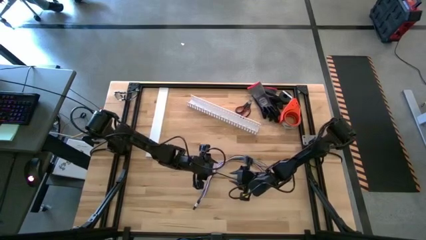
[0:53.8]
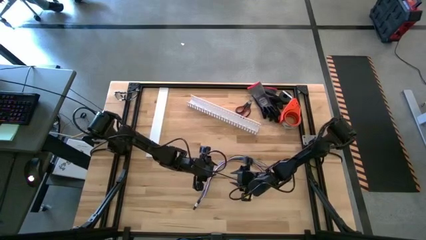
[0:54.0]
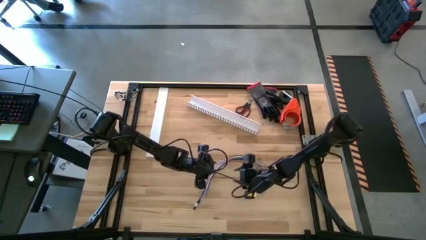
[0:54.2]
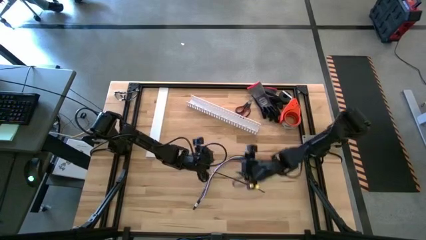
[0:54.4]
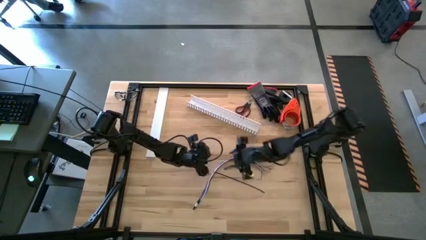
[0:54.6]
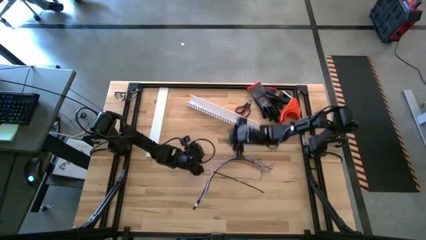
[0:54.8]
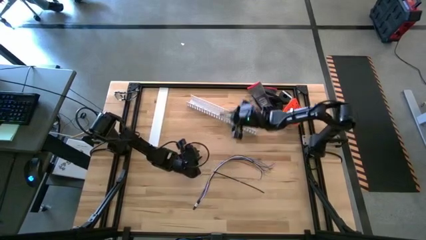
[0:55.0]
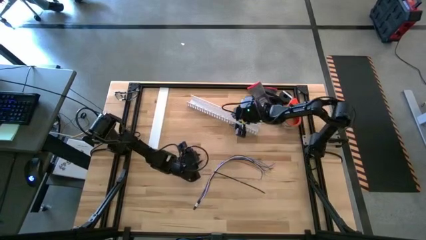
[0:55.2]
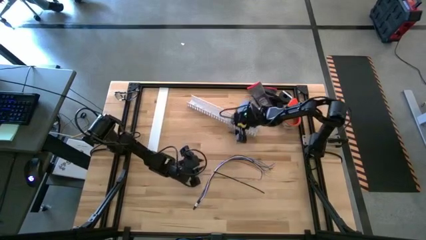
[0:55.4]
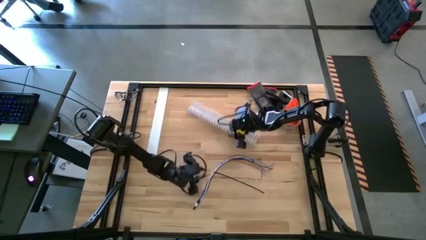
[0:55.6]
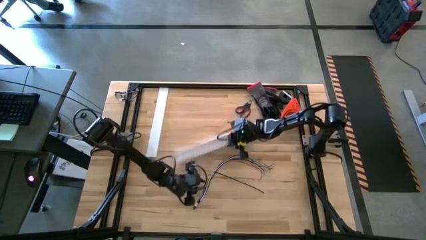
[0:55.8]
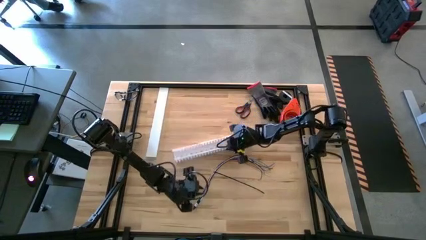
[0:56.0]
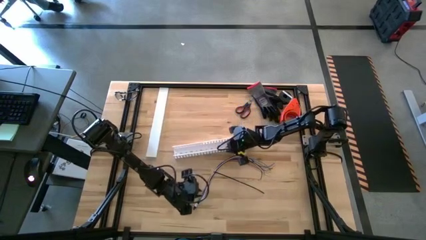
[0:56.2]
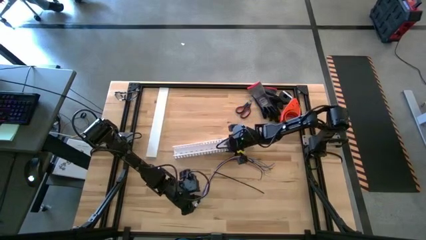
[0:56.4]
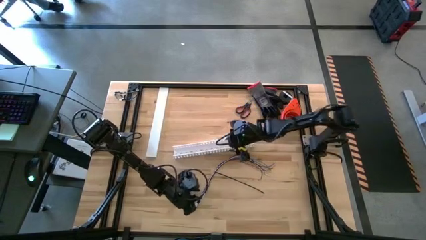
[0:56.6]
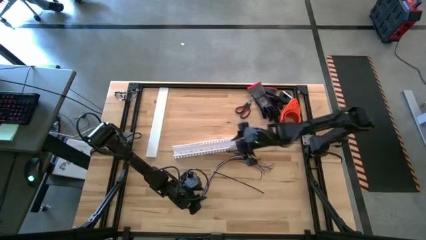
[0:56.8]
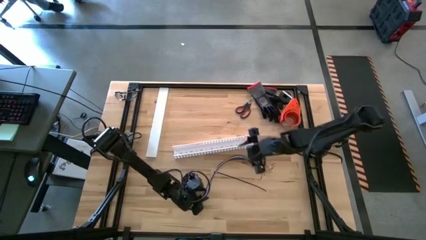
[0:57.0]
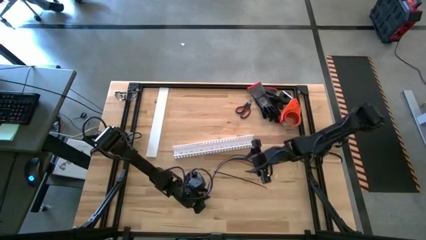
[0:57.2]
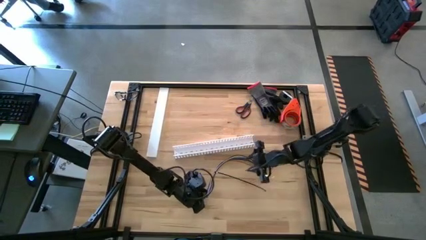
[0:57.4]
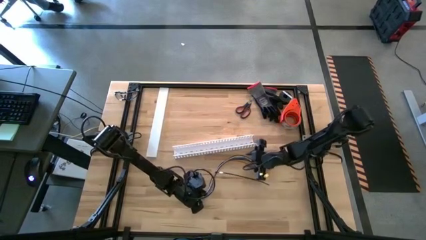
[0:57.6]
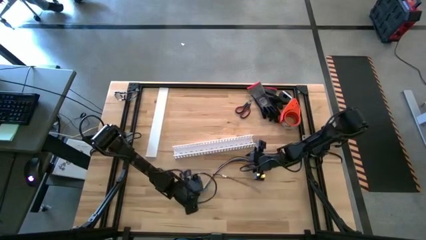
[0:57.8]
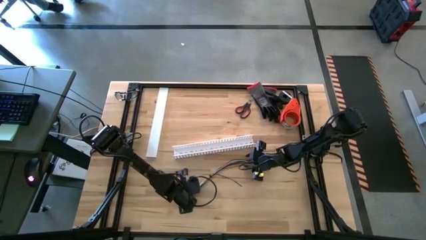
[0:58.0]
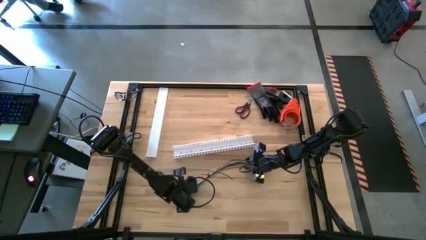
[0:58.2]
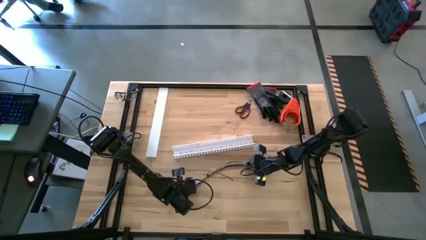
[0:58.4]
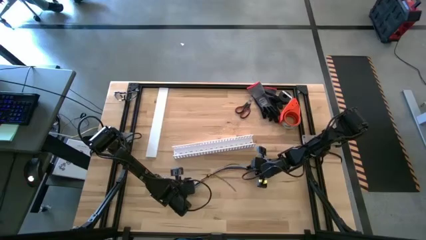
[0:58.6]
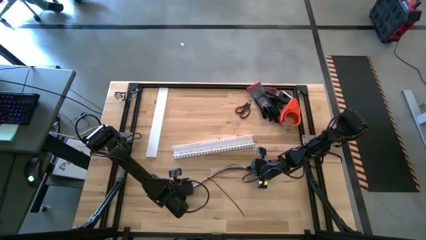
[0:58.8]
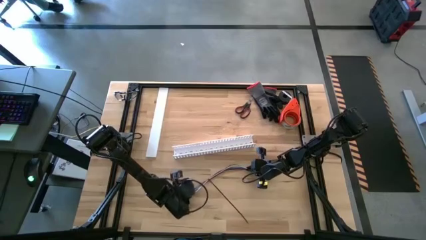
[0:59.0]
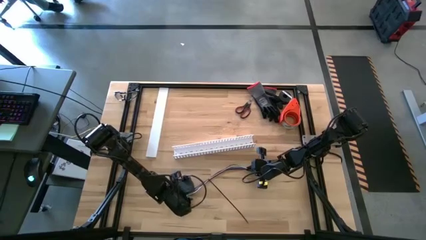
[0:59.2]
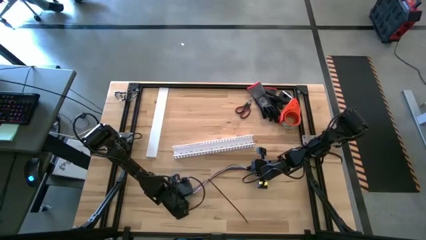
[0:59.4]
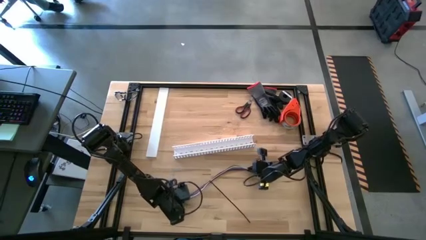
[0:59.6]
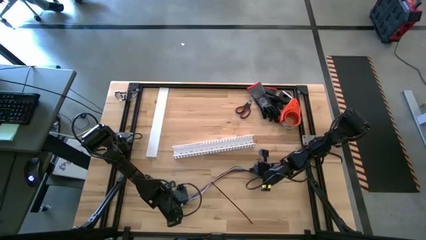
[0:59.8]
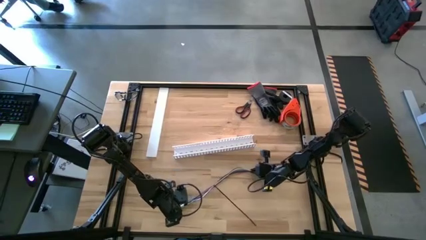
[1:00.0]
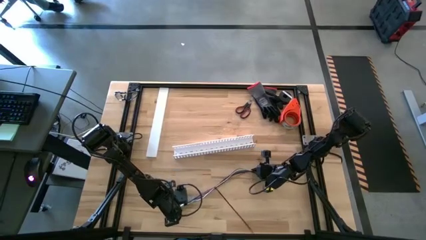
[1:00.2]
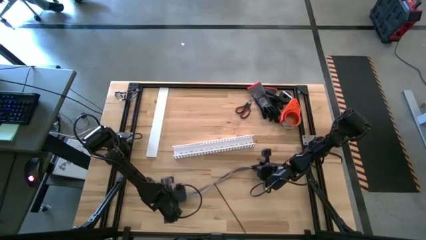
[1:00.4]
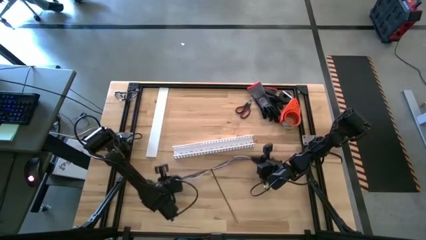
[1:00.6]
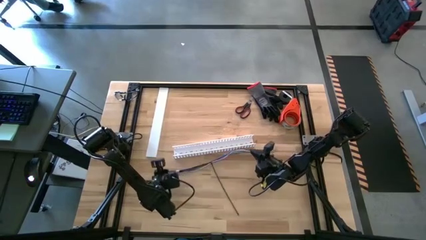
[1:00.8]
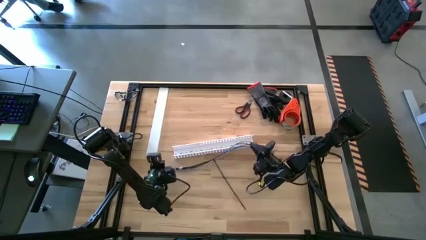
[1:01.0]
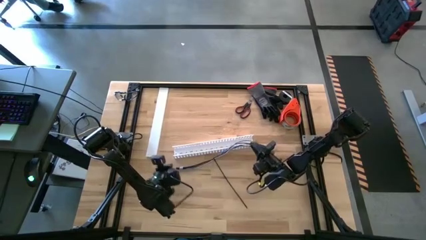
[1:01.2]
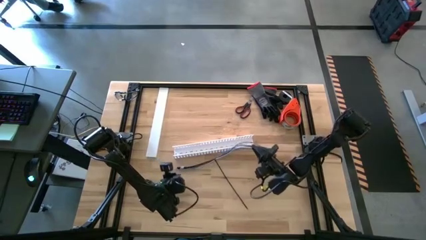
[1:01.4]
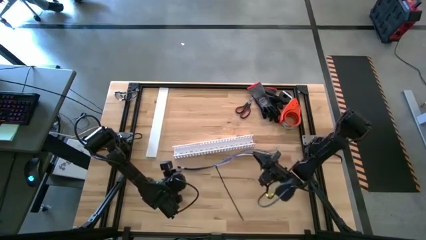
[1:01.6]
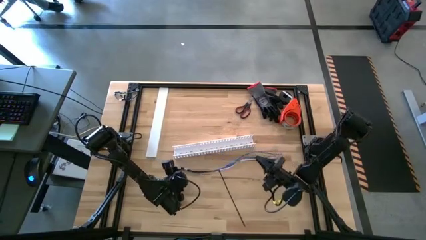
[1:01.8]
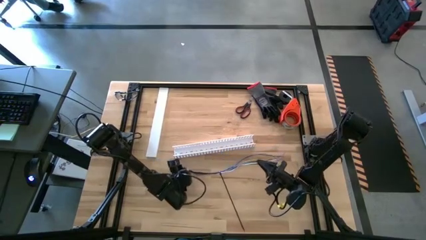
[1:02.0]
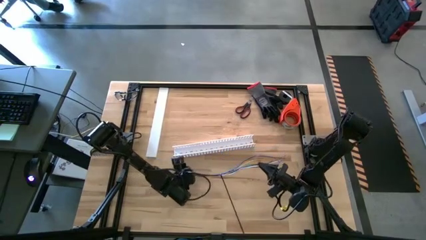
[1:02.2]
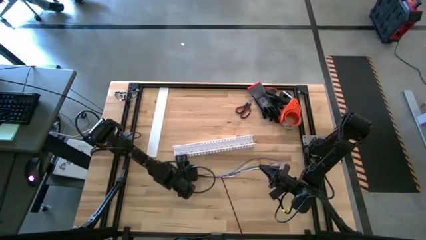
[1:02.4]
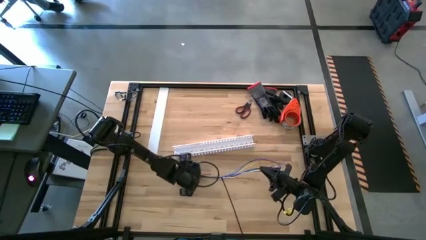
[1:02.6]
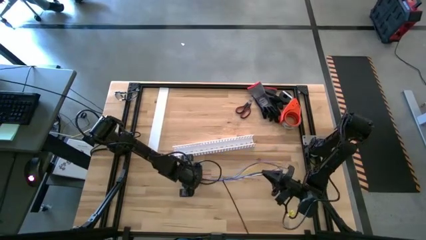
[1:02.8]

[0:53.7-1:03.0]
Task: Ziptie cables
Put the ziptied cable wires into the white cable duct

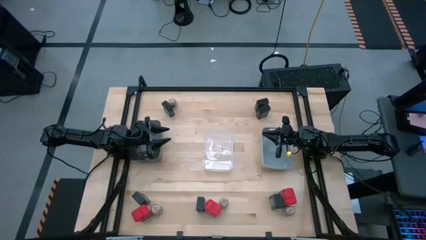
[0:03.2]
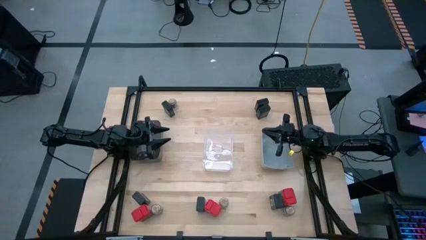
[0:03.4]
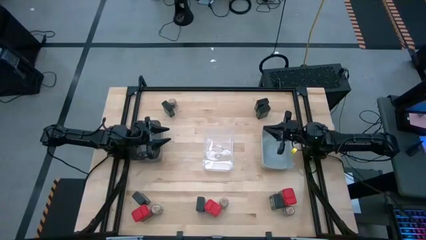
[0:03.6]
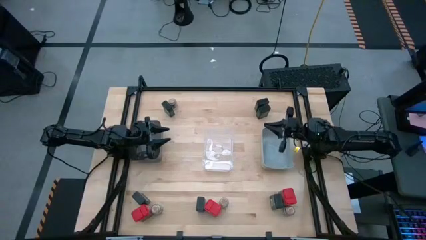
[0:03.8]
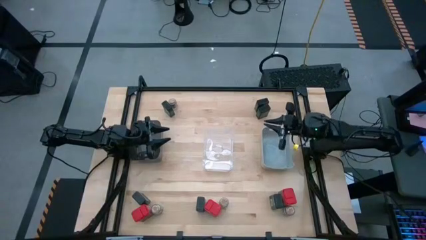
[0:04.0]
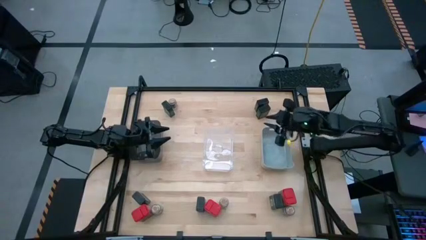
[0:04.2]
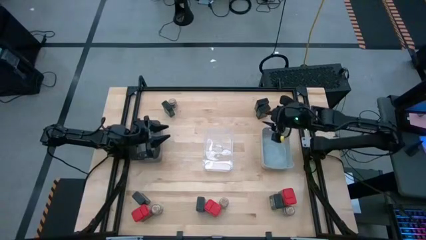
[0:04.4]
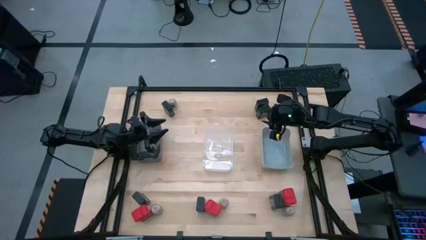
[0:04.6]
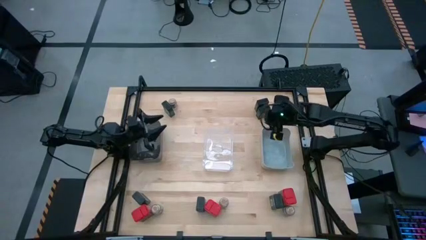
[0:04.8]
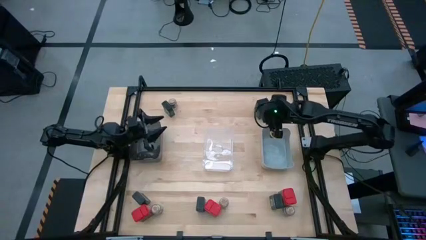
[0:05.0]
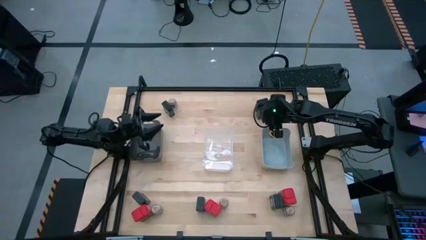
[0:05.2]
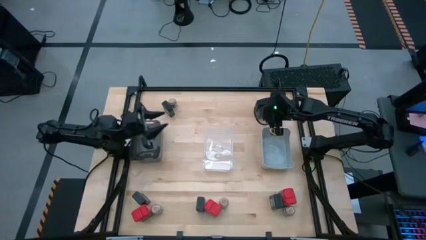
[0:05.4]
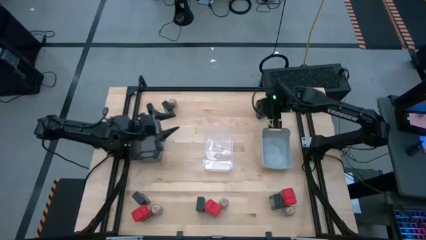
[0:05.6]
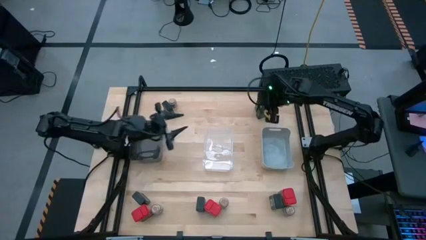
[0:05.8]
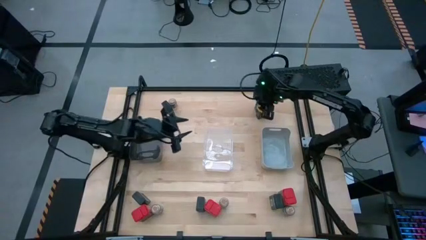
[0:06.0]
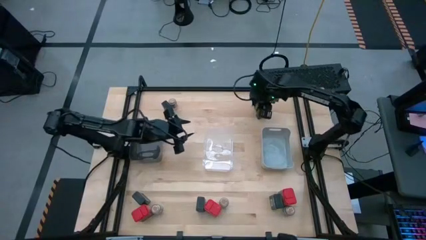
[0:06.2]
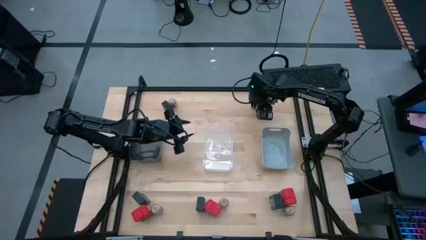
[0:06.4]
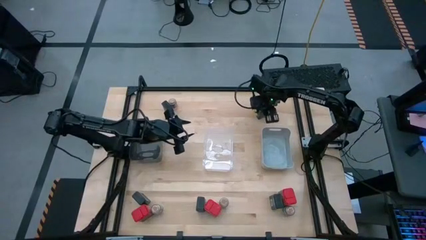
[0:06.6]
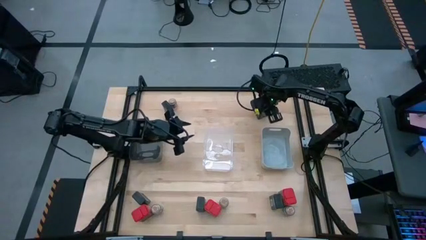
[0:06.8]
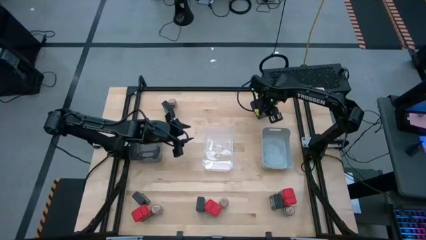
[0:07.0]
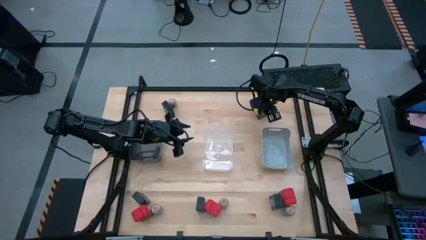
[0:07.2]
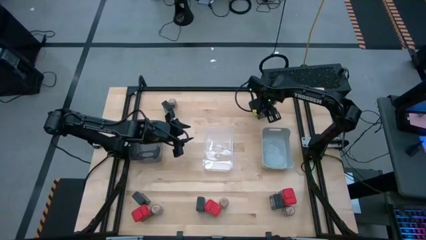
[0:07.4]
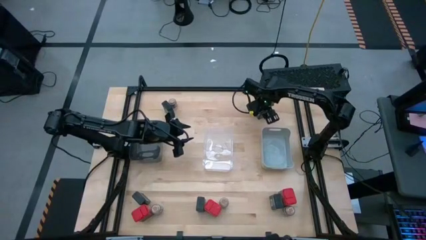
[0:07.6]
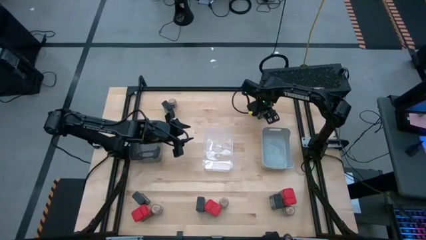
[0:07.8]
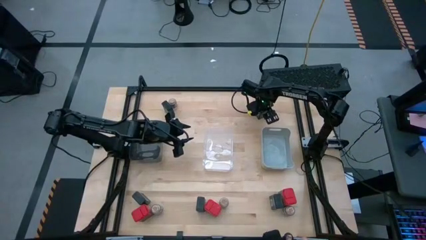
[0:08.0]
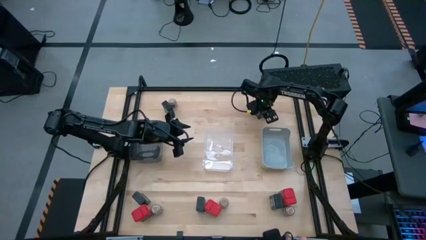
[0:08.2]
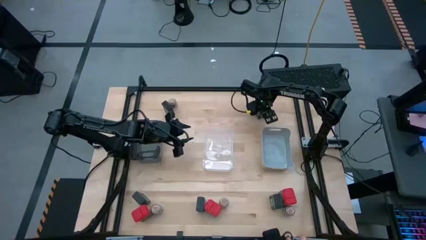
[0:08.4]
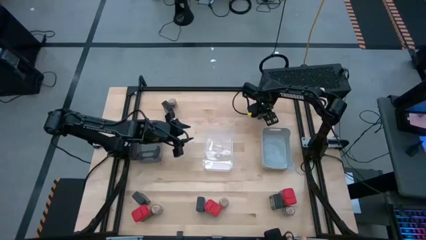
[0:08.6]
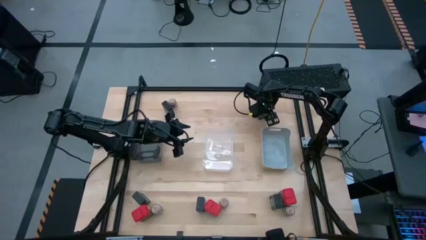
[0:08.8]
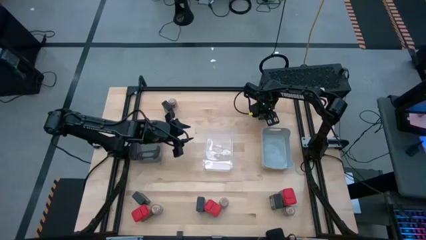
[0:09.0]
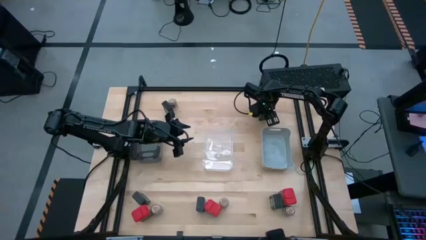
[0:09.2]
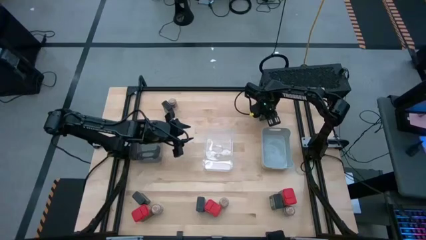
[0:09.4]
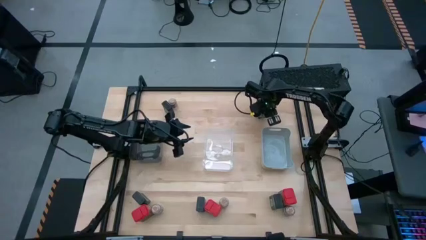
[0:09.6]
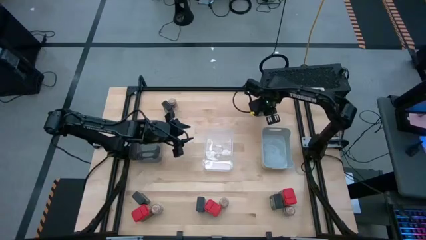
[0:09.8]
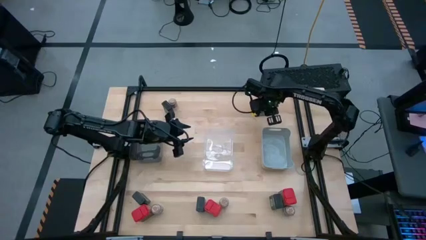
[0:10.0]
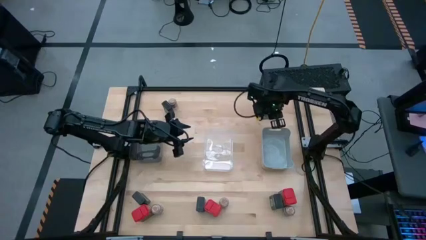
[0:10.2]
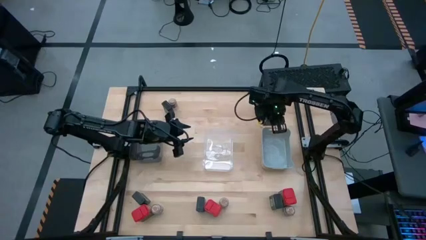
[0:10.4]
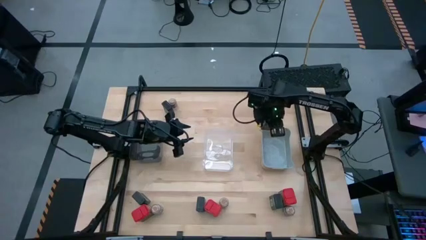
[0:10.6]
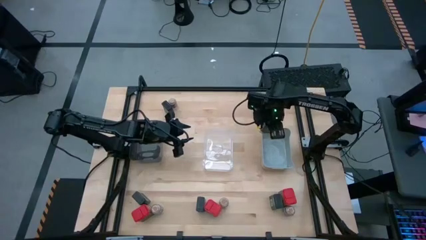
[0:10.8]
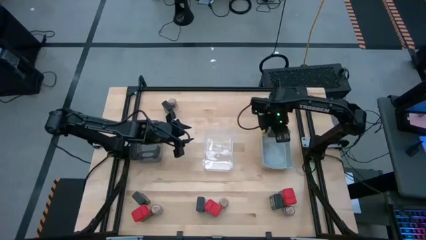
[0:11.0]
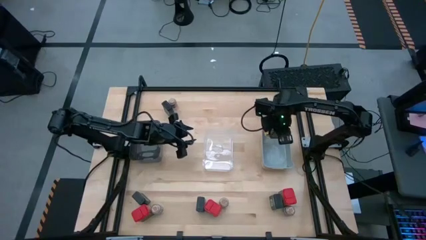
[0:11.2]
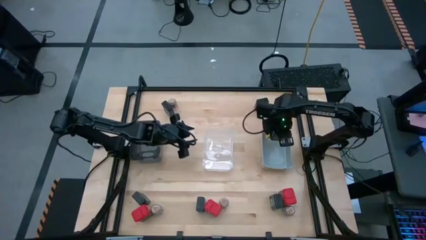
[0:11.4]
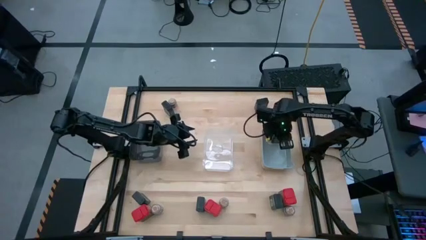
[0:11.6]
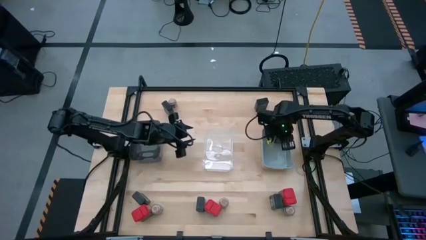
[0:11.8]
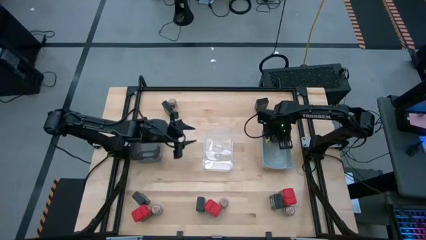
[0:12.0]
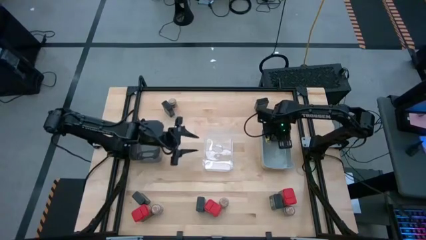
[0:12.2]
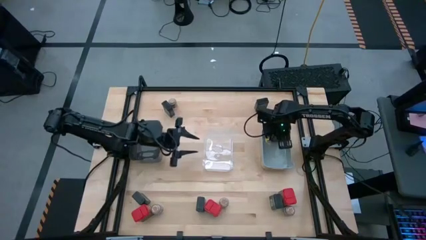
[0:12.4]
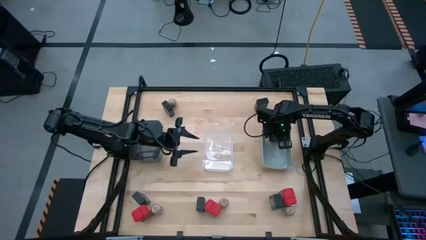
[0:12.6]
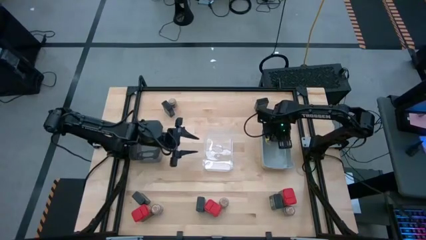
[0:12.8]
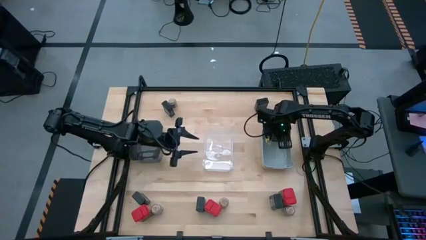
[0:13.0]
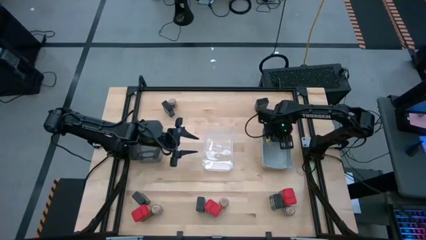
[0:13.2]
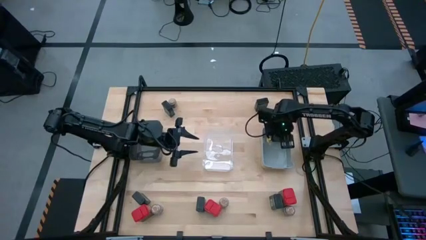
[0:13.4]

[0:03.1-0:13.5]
Task: Sort spices by type
Put the black seasoning can into the gray bin
